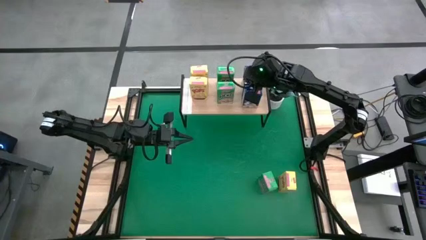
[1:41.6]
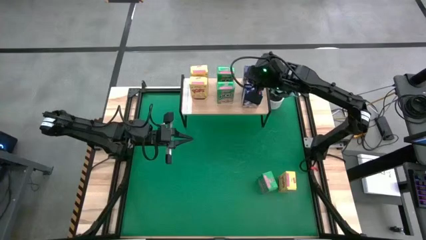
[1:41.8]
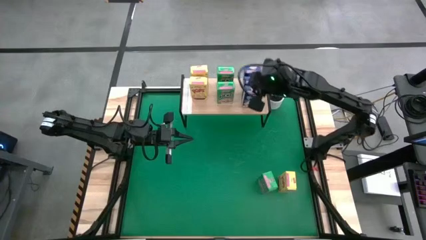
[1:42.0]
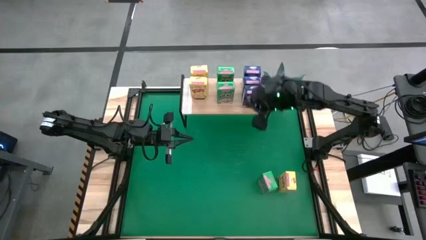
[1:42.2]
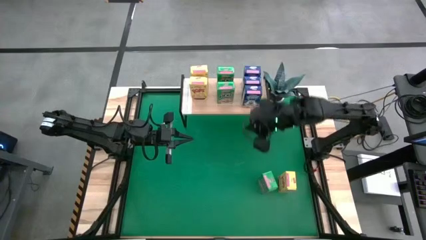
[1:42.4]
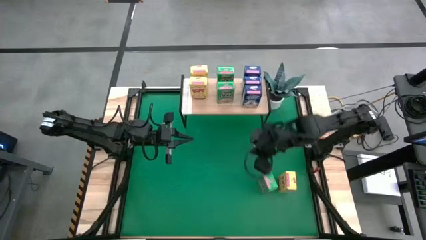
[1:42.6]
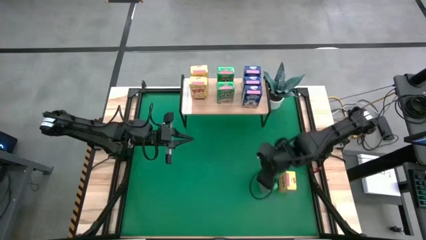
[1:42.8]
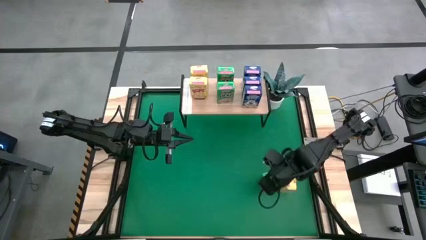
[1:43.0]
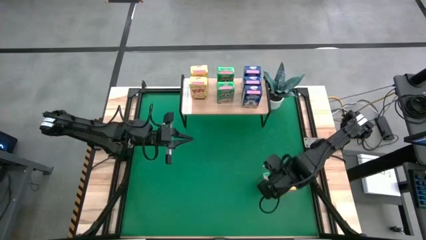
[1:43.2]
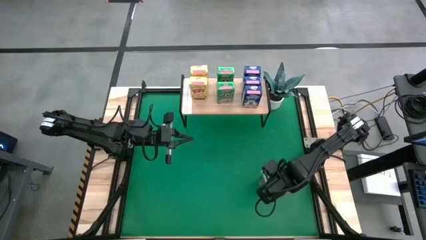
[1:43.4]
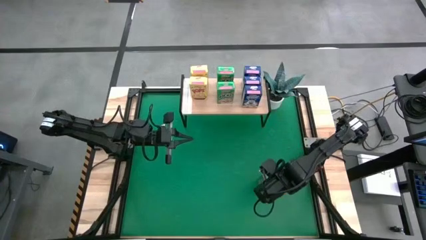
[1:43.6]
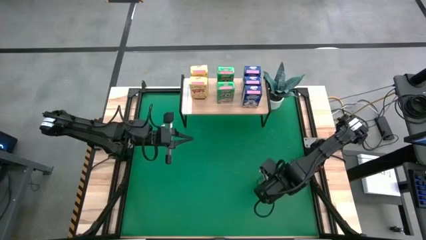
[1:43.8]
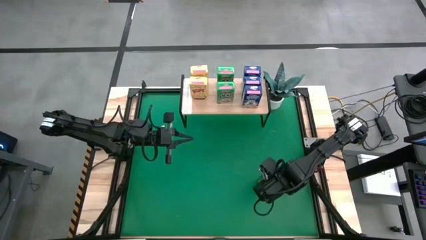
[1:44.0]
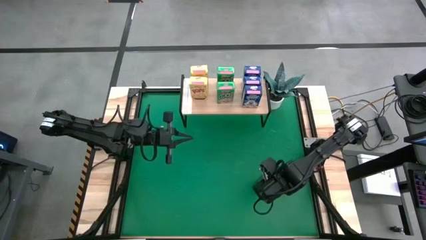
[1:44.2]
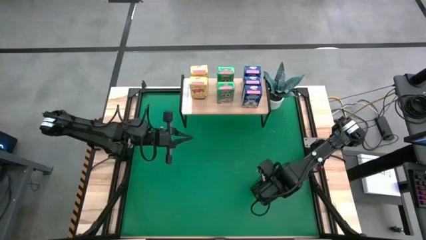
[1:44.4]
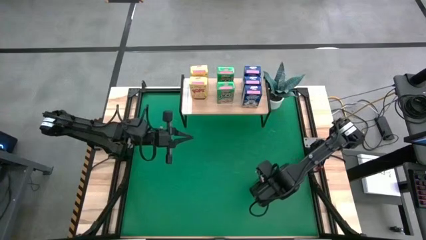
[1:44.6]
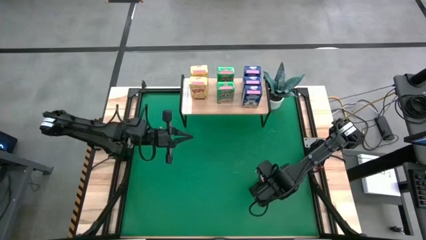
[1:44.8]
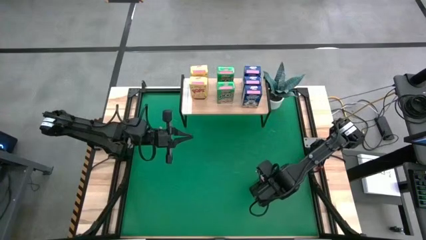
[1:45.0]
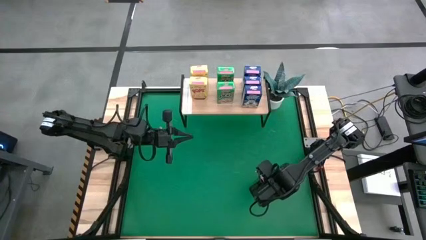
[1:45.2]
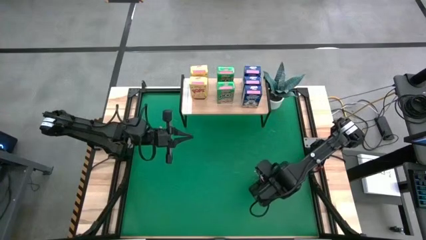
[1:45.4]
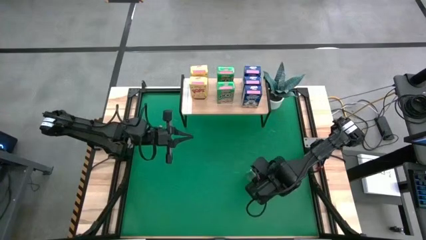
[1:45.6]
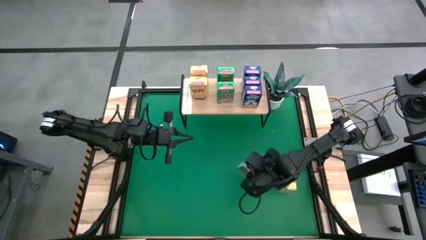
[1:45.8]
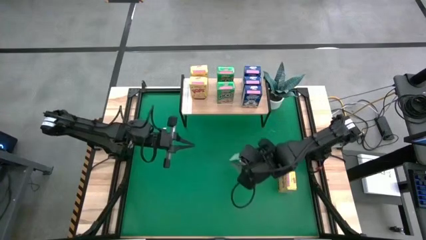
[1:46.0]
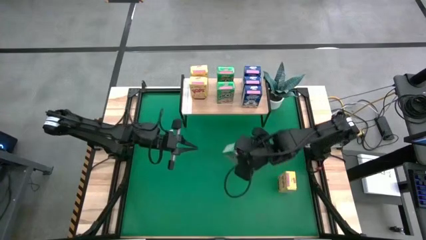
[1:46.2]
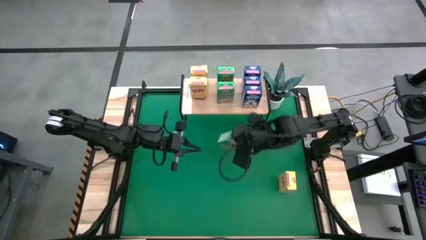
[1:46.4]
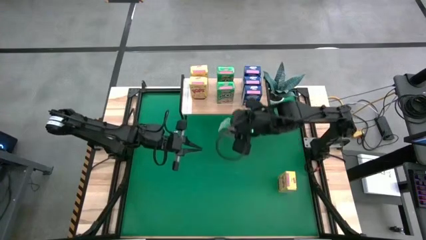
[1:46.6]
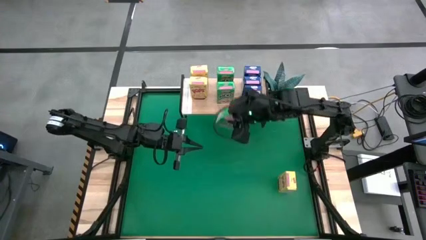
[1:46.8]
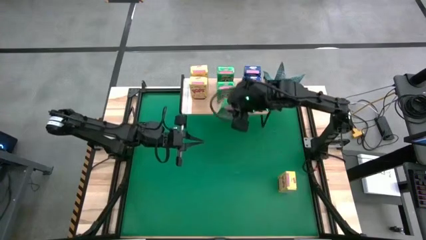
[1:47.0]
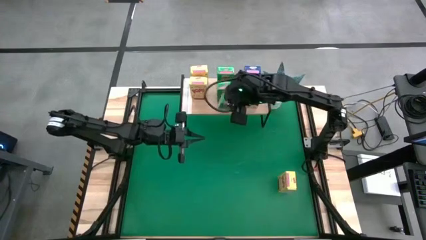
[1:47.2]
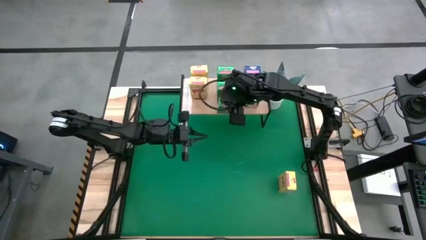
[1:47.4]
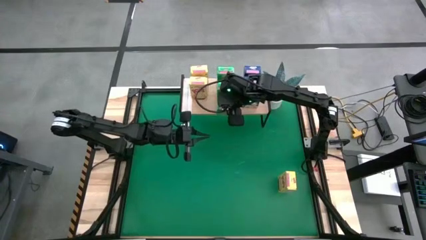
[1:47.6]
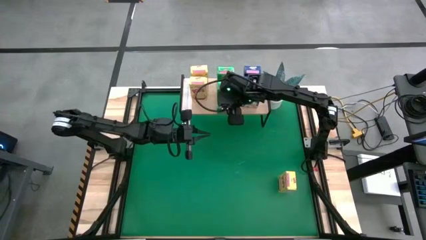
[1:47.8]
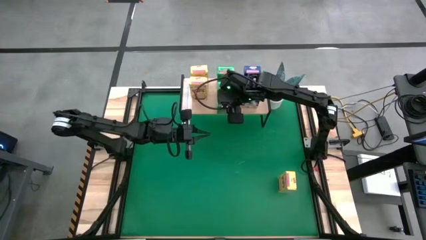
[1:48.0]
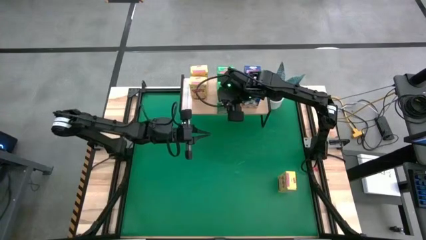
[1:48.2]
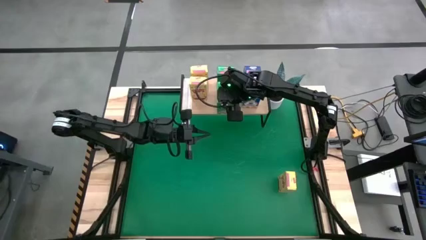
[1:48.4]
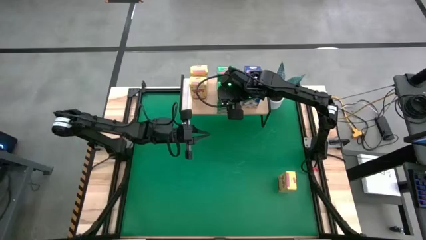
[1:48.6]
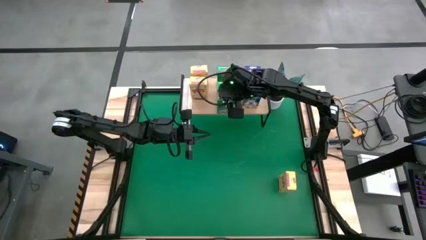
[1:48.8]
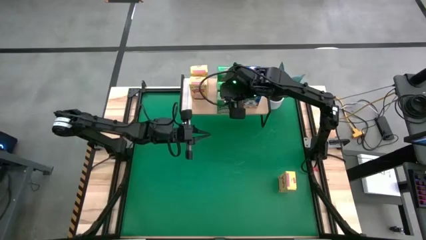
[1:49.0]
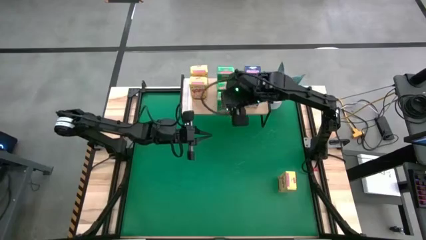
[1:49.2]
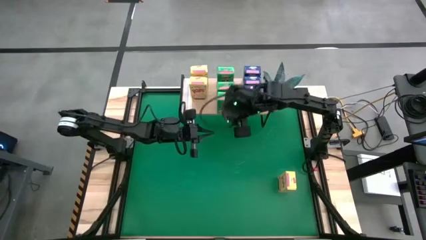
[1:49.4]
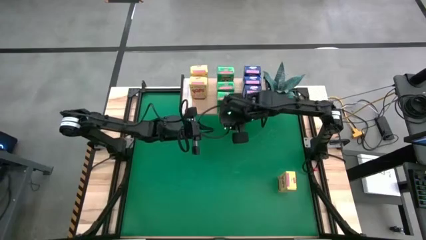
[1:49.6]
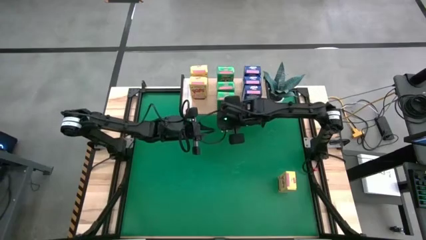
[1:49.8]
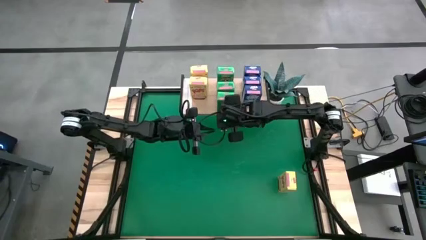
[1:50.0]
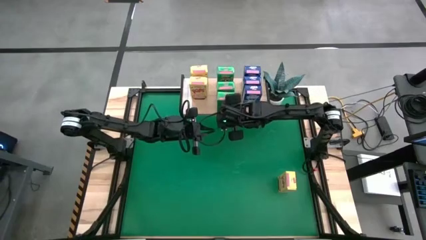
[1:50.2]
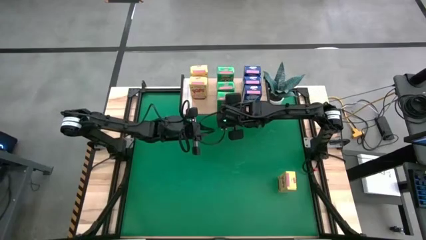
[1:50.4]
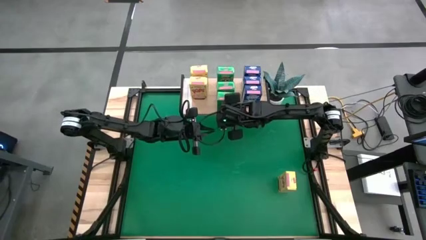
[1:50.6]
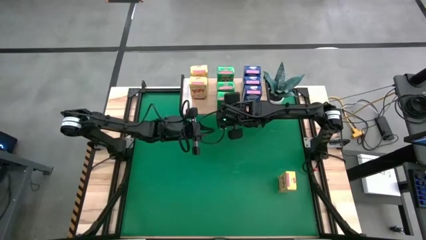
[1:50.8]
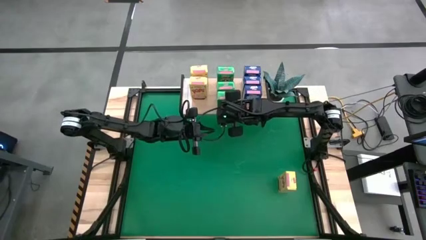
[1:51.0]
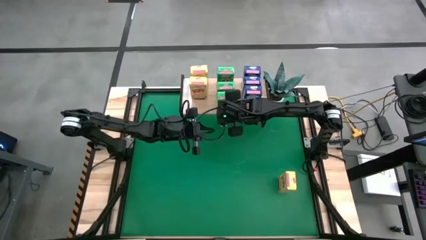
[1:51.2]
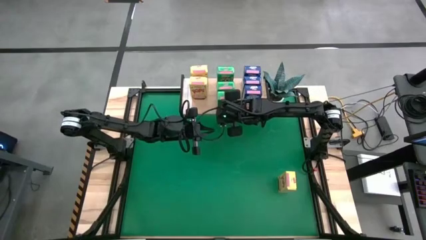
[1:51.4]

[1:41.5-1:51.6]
Task: Stack cereal on shelf
Put the green cereal box on the shelf aligned with the other green cereal boxes

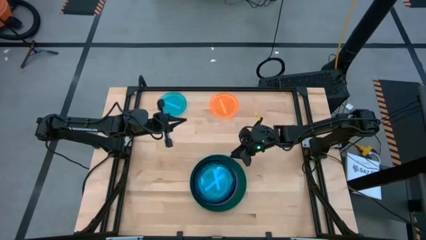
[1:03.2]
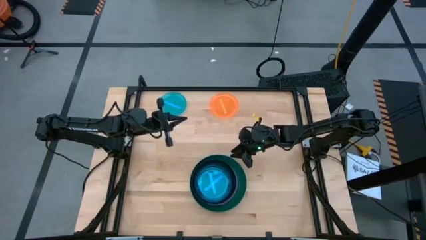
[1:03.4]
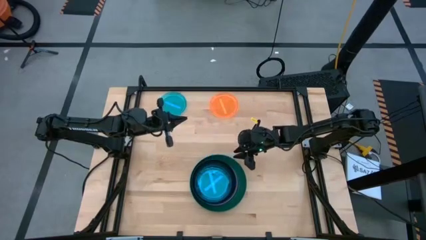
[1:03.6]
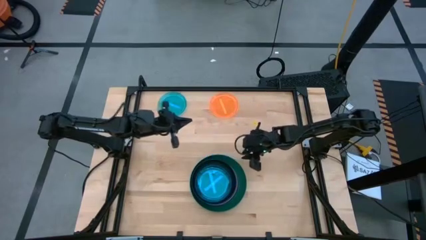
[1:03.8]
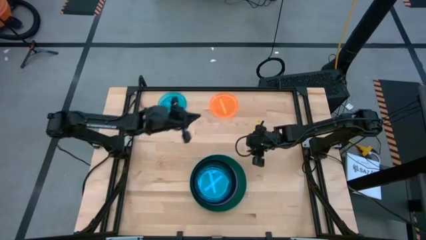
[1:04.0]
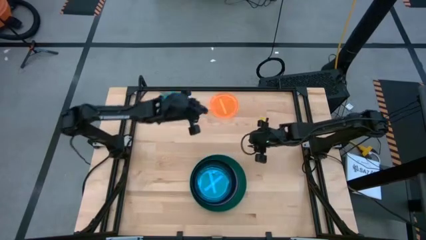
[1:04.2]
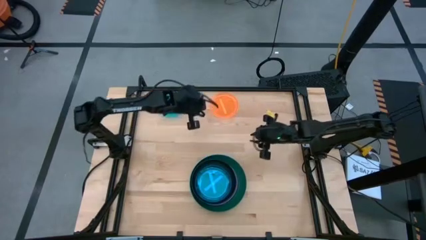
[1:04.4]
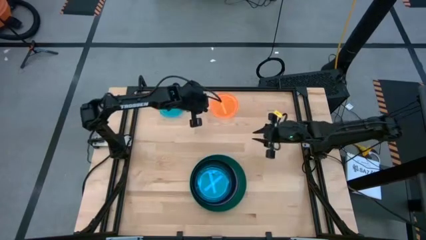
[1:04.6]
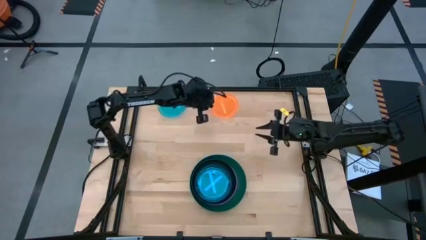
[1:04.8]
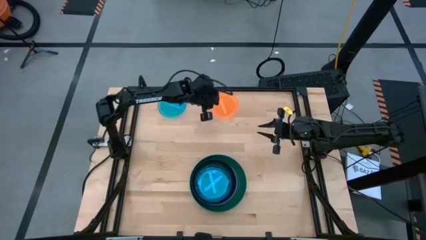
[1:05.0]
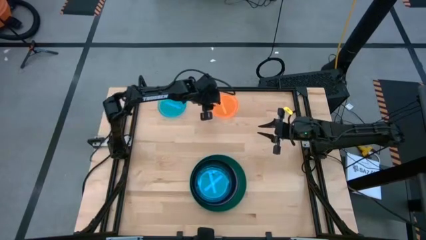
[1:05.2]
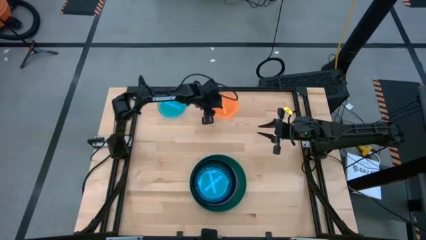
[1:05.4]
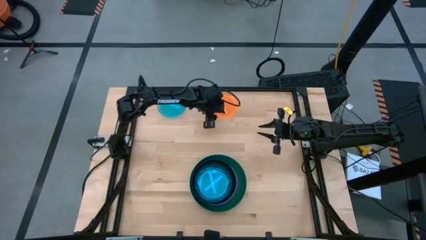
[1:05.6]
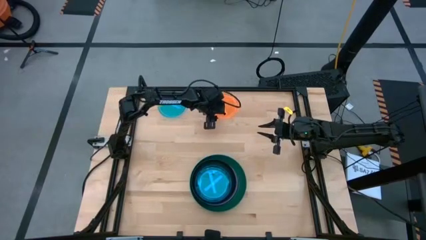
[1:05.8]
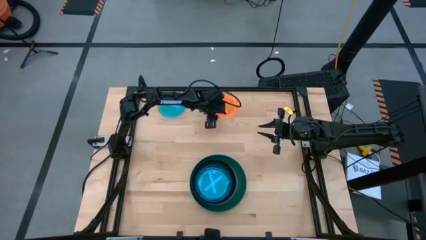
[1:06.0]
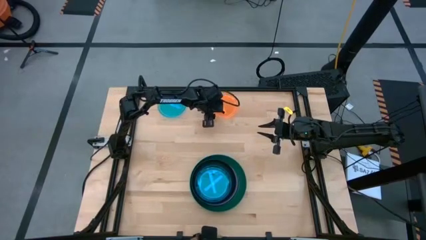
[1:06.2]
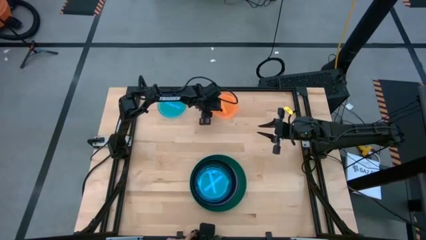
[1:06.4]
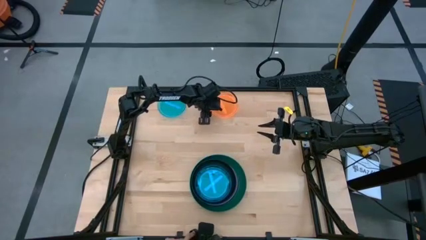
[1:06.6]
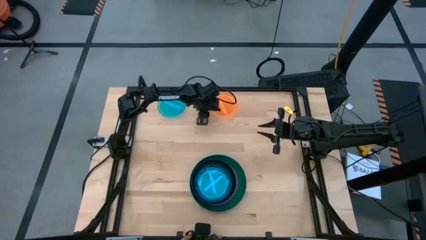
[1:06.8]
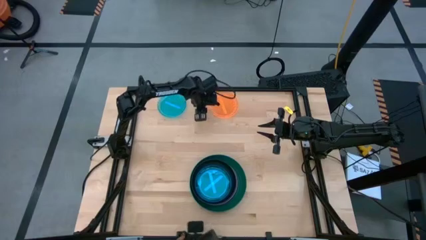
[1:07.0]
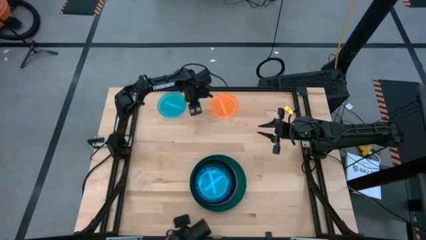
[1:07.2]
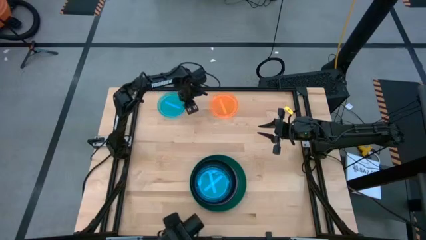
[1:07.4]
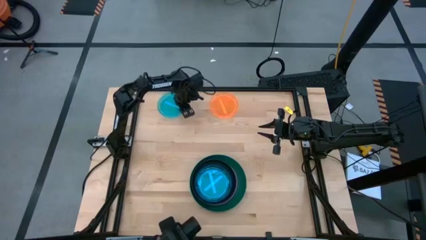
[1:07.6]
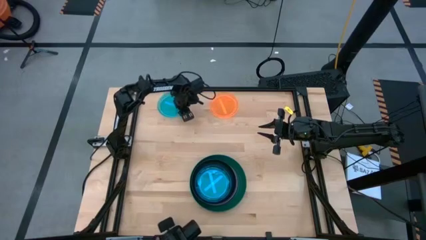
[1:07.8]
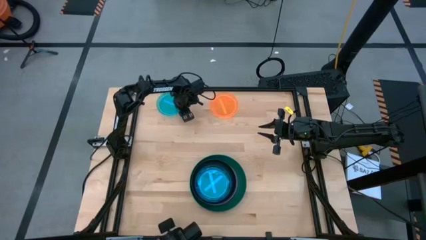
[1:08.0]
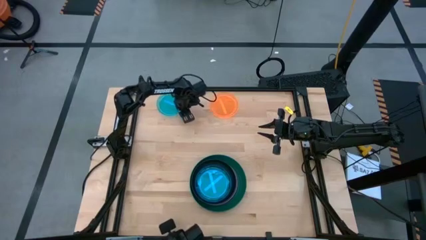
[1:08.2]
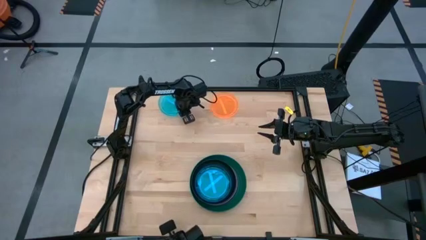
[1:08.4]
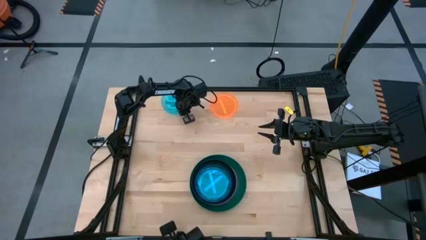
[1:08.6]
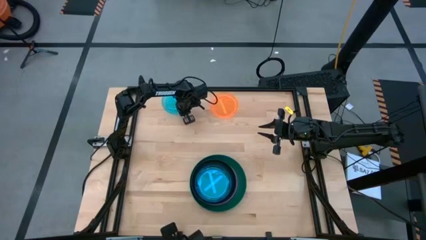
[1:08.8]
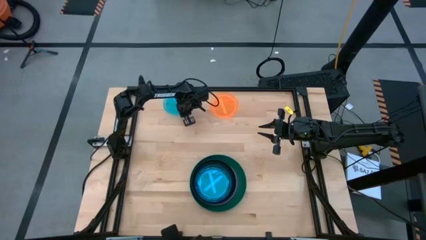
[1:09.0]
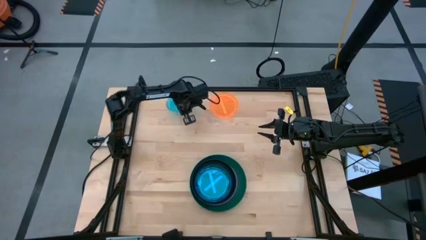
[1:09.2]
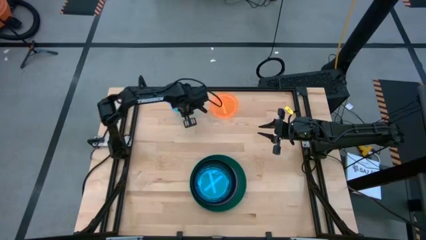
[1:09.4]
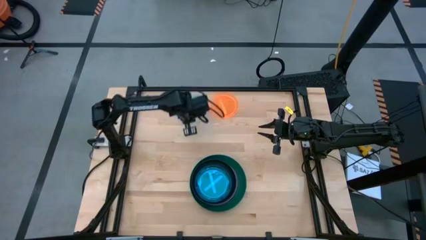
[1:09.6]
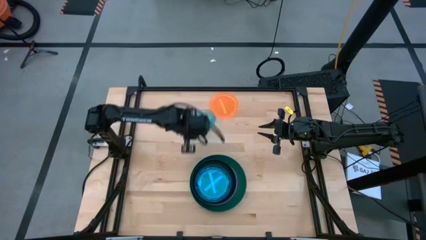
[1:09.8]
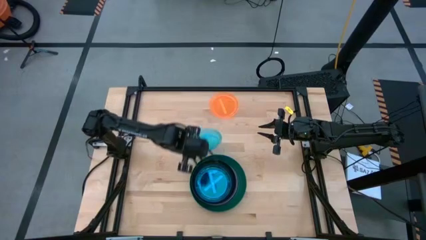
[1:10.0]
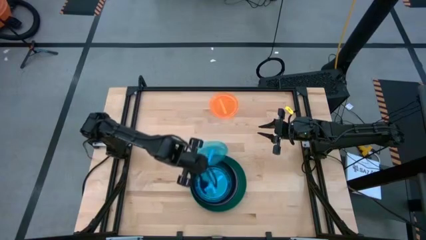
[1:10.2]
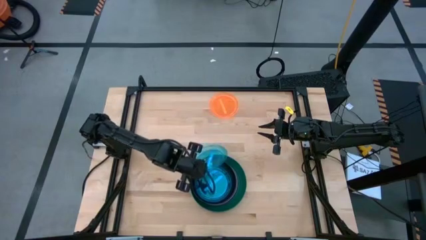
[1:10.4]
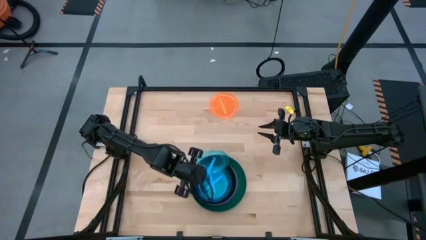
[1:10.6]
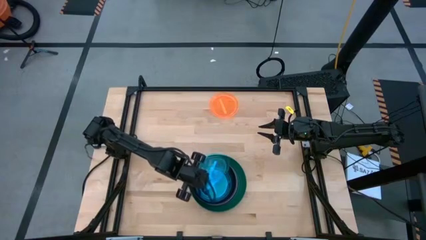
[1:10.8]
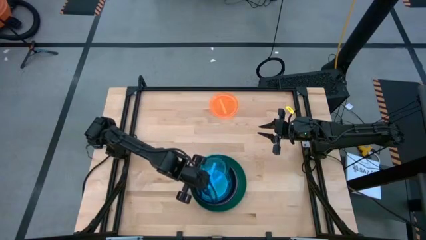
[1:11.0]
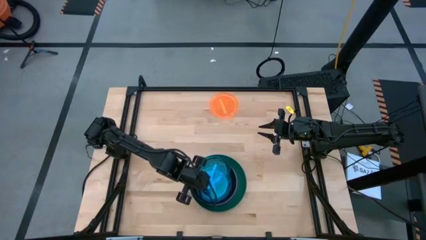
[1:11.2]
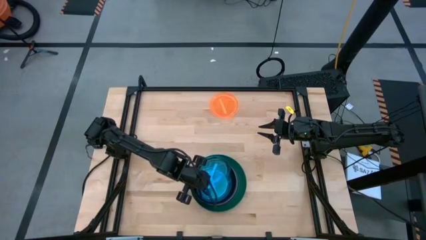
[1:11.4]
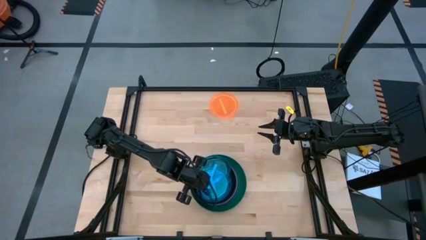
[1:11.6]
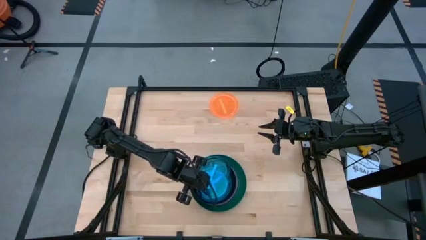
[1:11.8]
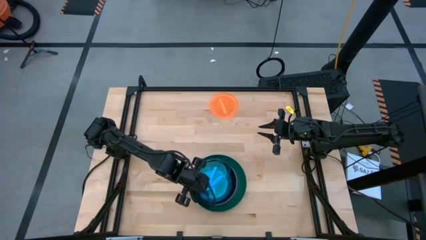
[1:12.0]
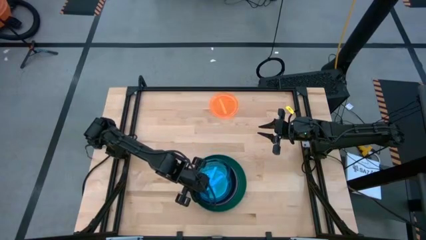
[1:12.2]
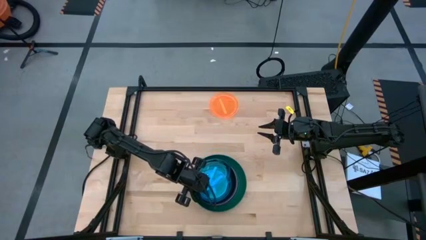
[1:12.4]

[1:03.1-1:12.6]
Task: Stack plastic plates
Stack the blue plate on top of the blue plate
